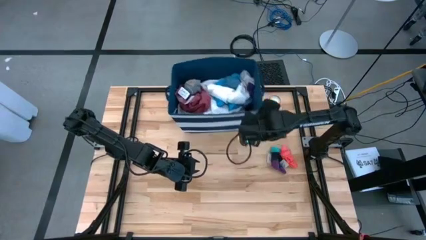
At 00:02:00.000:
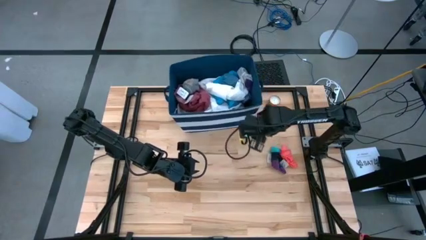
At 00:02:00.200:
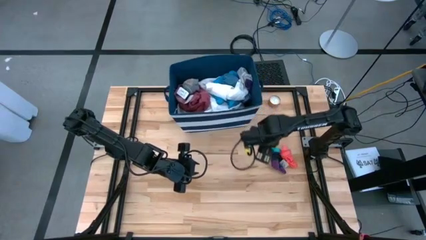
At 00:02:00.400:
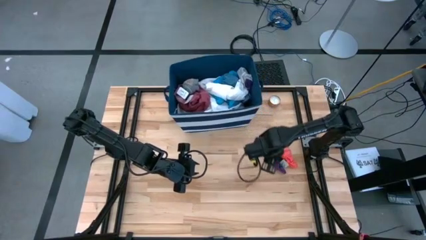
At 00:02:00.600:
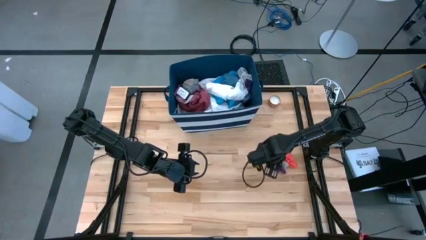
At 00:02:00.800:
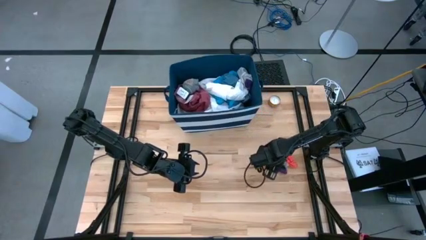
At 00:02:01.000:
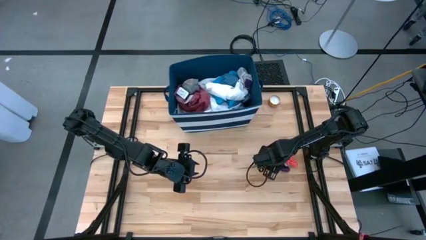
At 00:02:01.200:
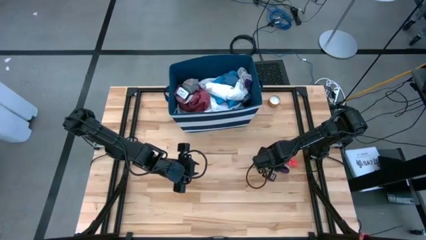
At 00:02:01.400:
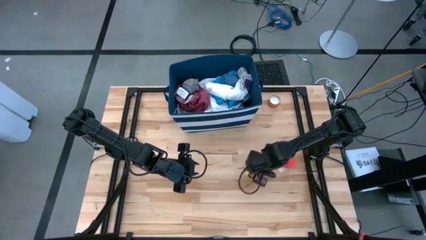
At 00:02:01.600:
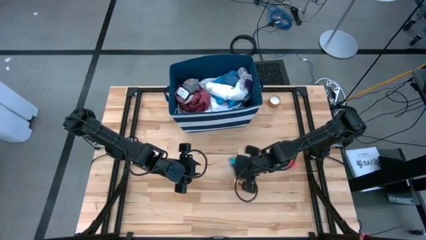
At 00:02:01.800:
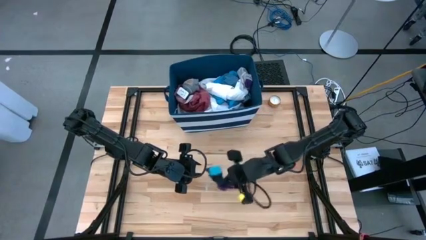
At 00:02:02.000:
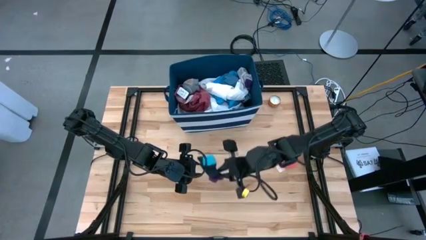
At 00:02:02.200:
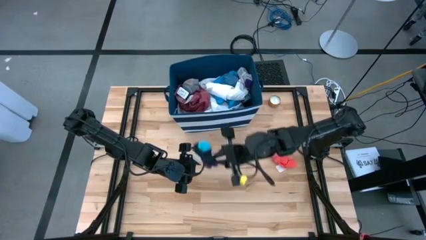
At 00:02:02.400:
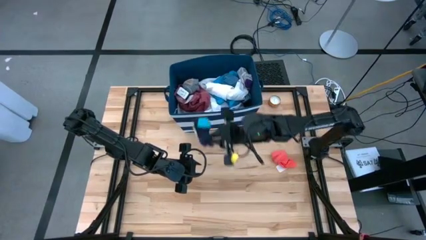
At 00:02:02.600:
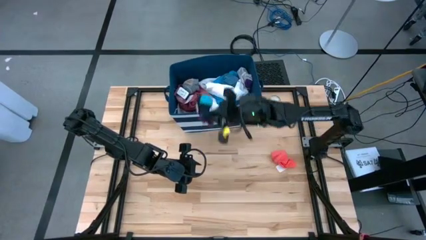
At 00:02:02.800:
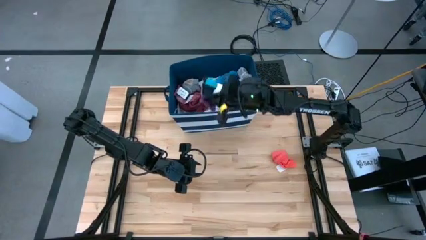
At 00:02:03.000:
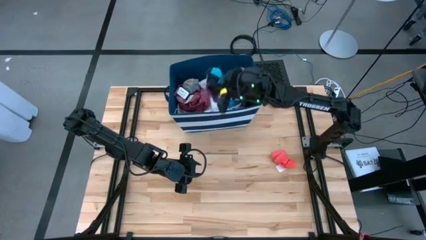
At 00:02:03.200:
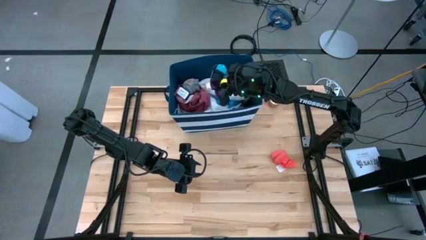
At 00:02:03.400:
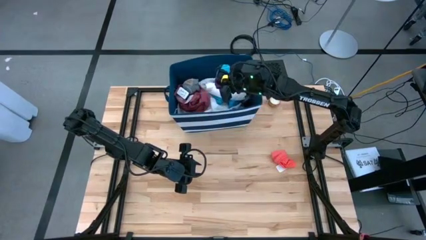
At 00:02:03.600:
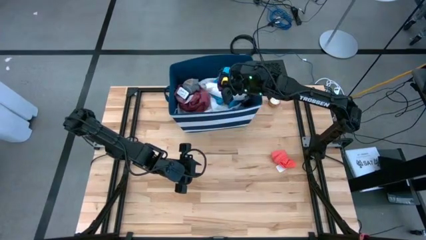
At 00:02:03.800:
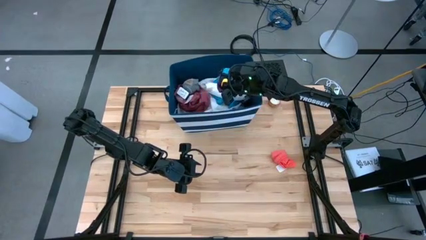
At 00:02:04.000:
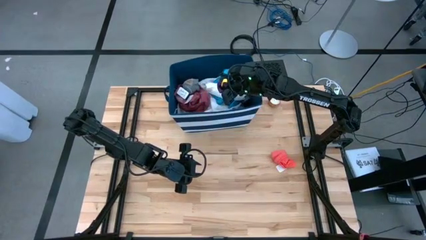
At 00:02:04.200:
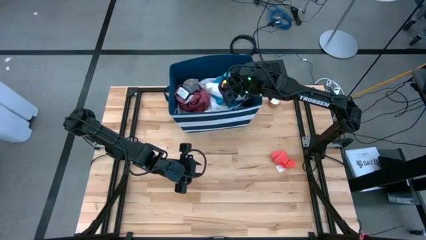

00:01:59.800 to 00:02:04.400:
Task: Sort clothes
Put the multicolored sock into the blue bin

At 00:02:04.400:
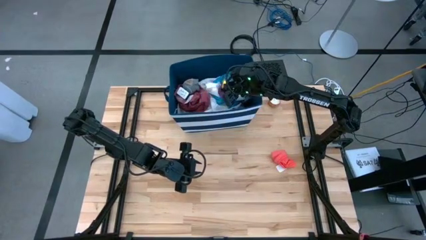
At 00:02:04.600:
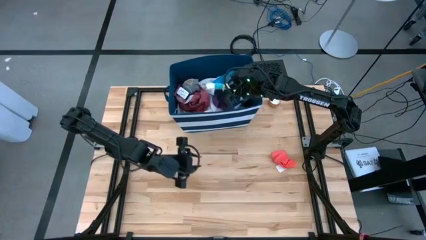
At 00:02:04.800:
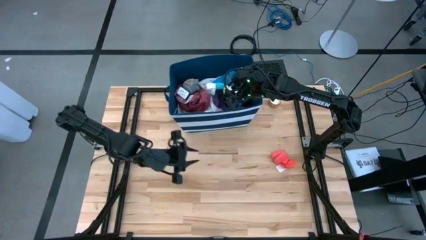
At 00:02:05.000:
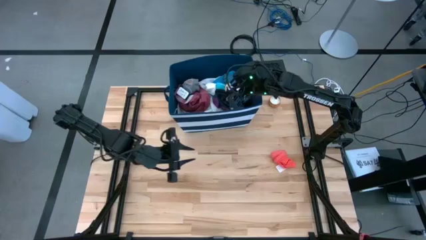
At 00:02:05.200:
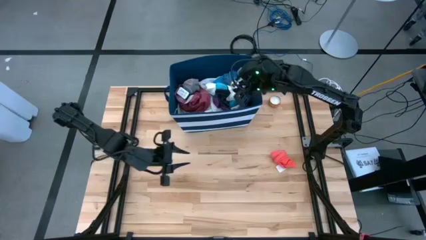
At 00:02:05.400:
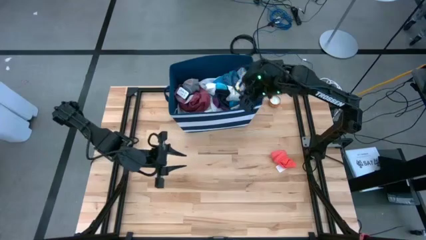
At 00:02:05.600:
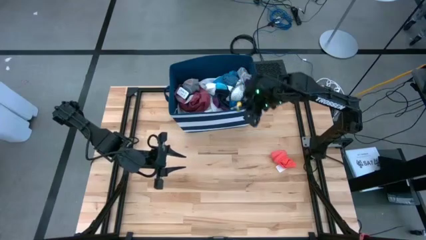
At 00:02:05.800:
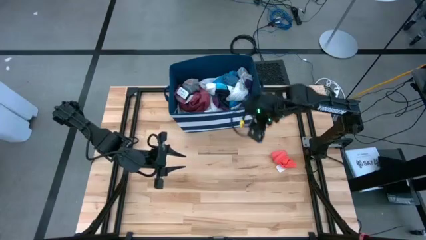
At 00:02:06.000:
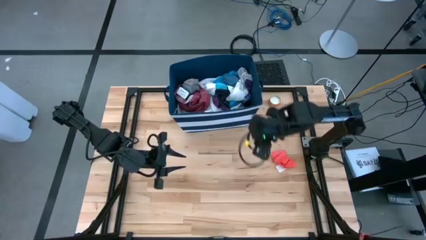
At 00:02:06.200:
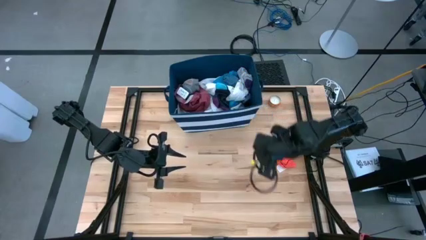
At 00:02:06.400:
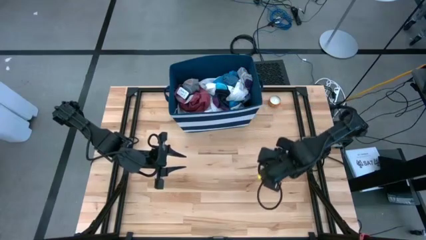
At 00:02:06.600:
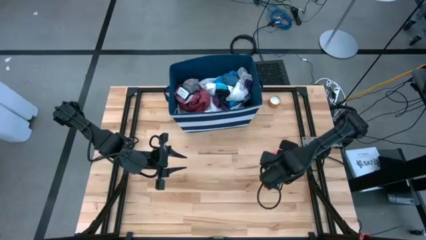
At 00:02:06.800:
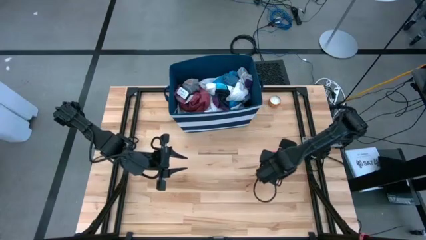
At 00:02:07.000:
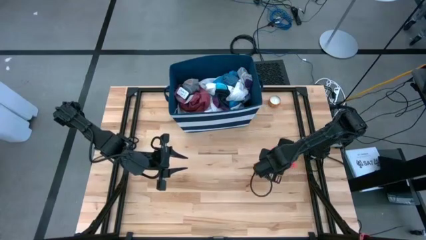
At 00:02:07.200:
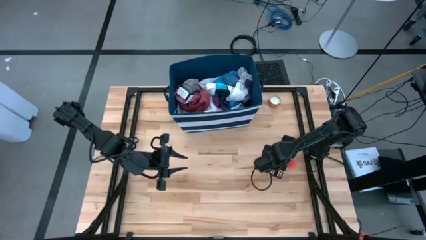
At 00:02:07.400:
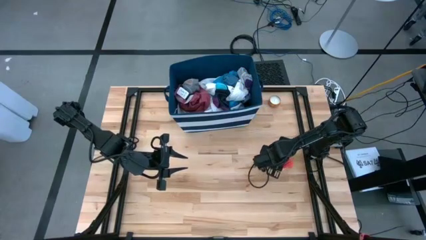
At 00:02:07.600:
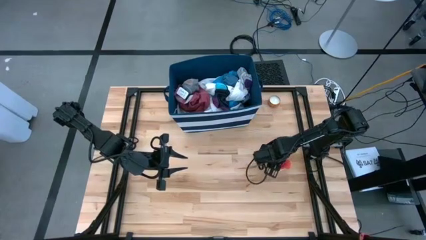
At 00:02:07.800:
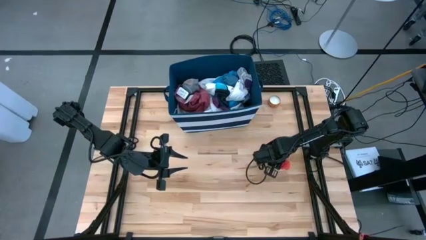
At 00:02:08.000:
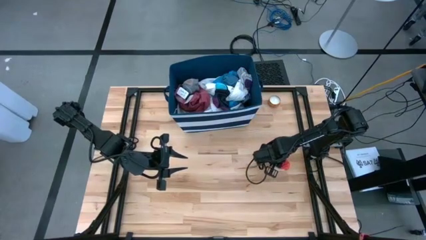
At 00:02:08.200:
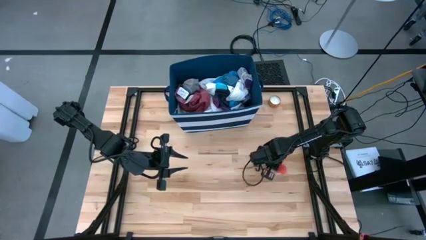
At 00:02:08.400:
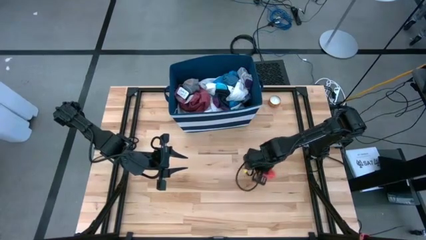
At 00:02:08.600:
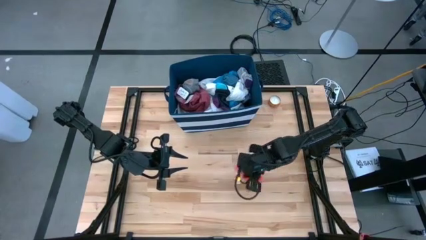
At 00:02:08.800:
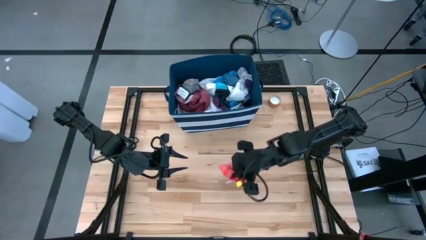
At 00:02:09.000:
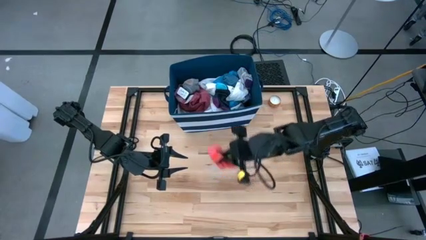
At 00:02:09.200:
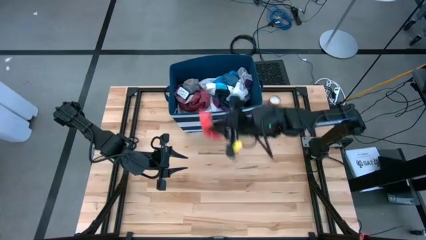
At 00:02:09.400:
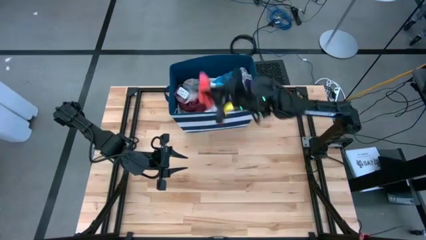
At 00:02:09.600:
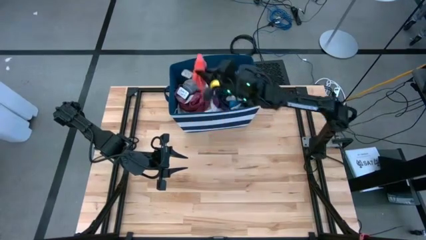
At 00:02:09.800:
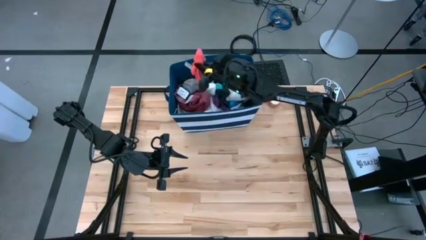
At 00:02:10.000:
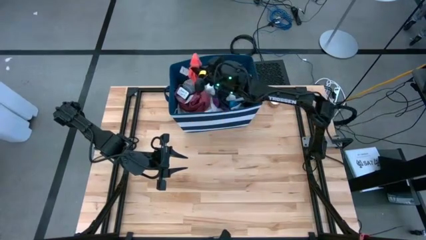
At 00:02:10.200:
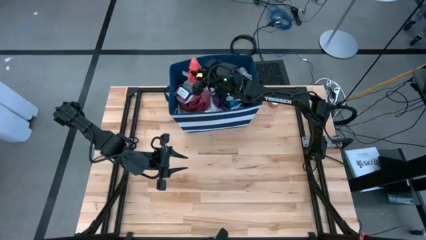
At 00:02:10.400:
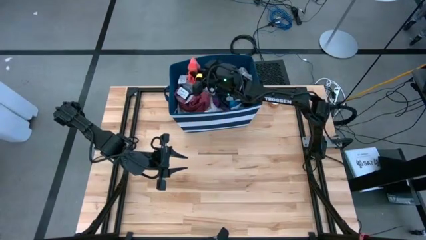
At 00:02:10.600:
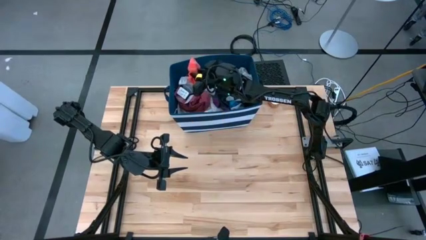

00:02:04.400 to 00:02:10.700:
Put the orange socks into the blue bin

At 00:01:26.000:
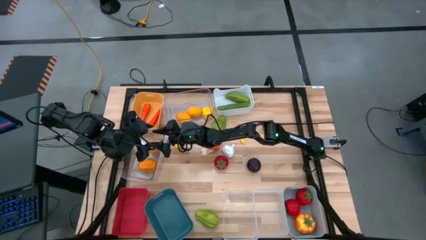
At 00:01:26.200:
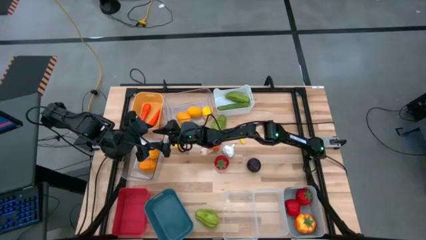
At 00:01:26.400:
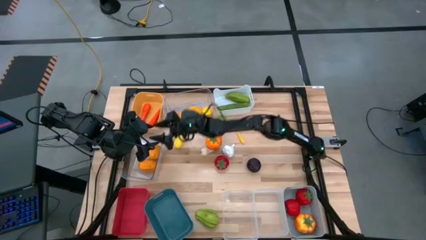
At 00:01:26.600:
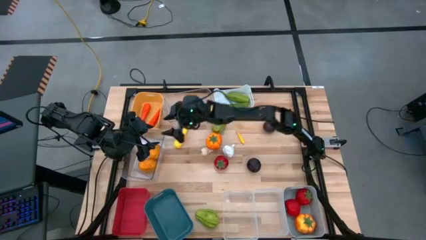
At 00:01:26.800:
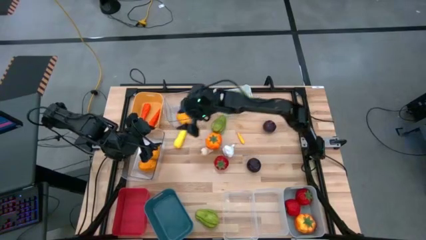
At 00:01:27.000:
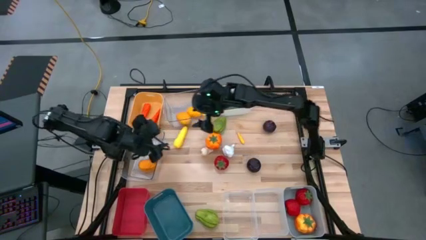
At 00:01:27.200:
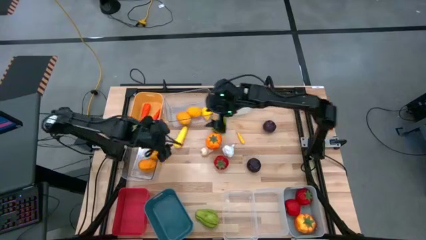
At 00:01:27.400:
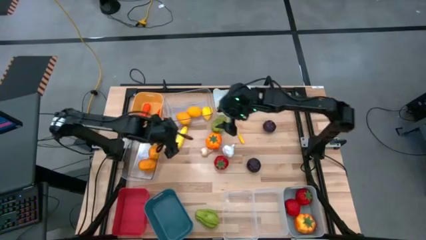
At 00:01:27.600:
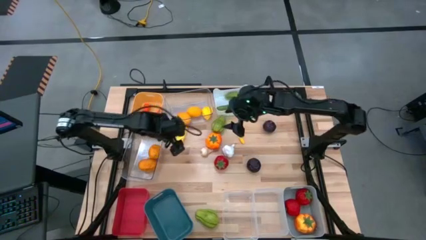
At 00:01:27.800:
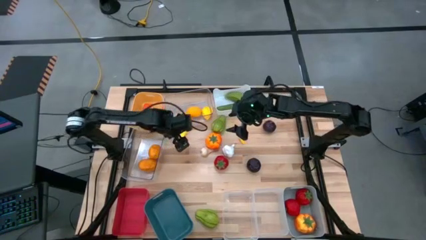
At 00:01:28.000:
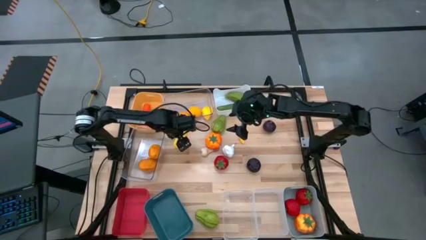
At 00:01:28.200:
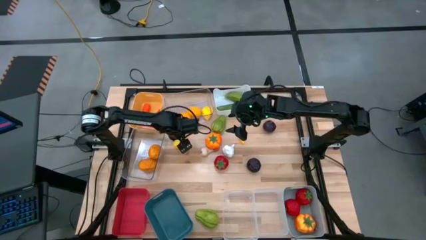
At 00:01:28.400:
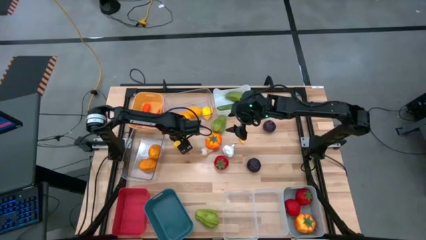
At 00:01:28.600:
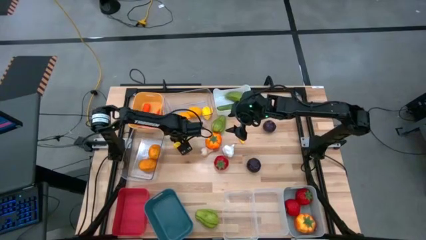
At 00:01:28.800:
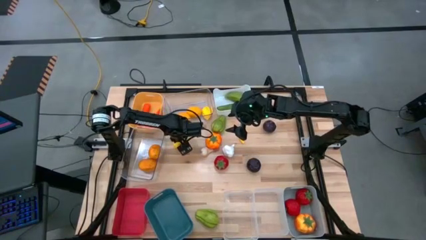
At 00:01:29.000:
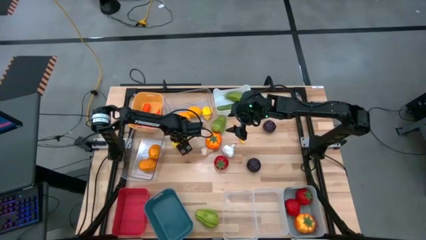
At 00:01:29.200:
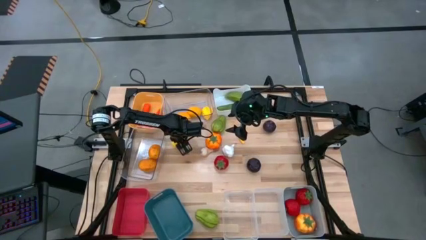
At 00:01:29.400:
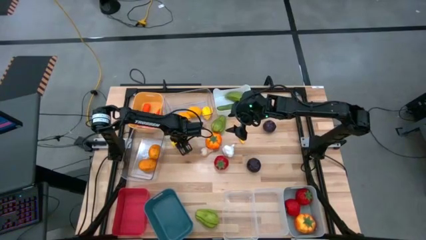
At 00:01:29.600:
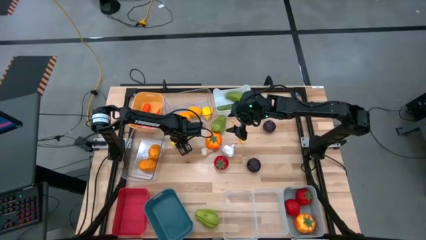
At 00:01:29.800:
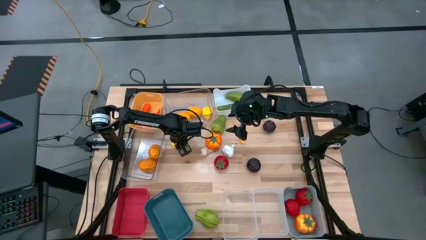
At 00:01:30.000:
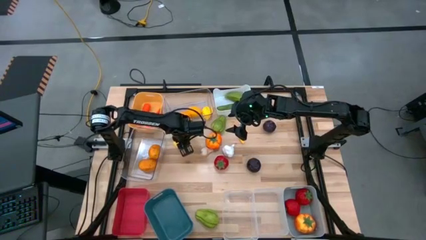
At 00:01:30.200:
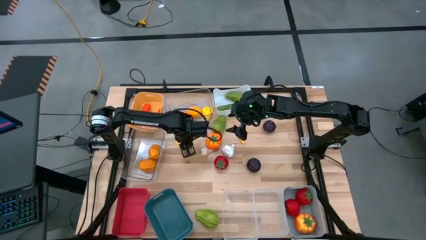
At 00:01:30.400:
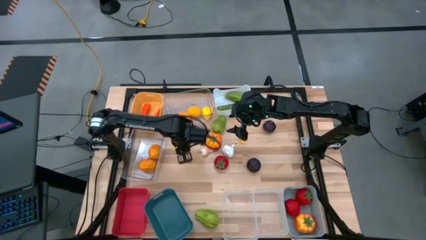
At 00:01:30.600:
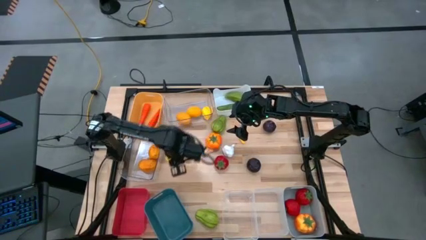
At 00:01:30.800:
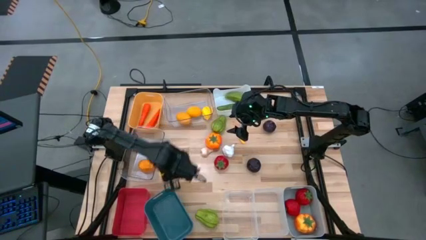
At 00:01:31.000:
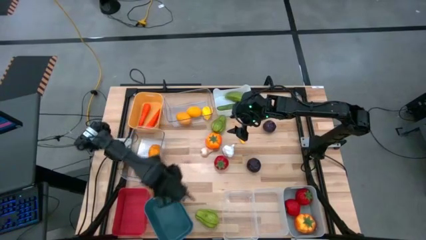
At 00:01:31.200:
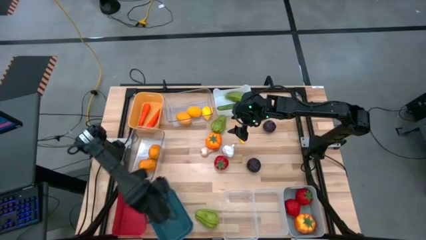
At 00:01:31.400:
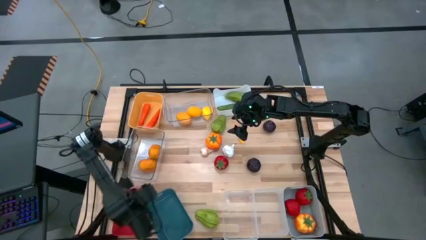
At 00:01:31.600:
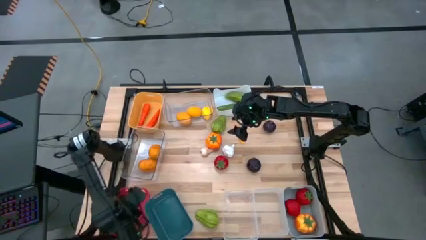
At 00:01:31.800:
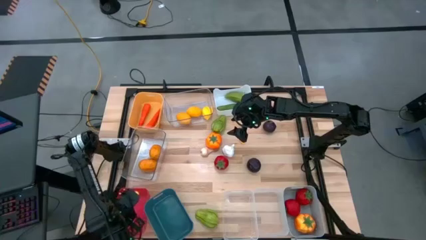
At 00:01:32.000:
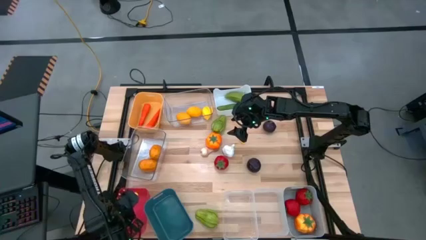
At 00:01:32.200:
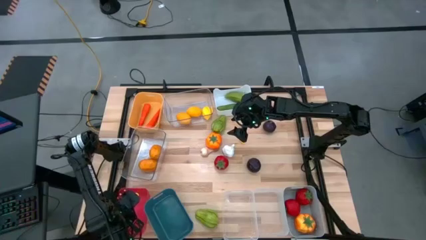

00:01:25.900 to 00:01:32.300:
Task: Sort produce into baskets
Put the left yellow corn into the red bin
